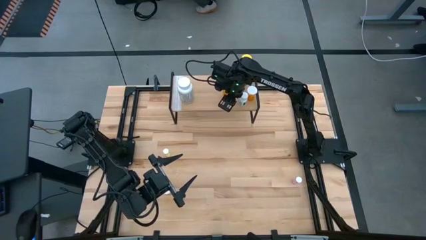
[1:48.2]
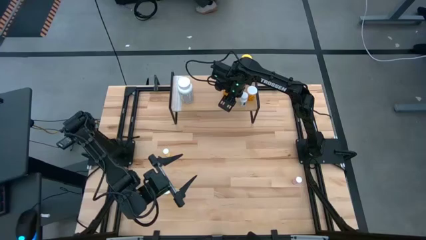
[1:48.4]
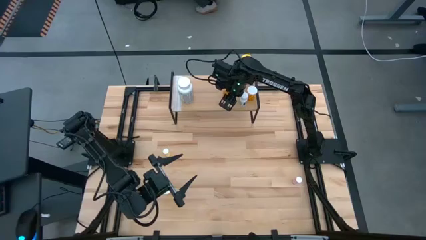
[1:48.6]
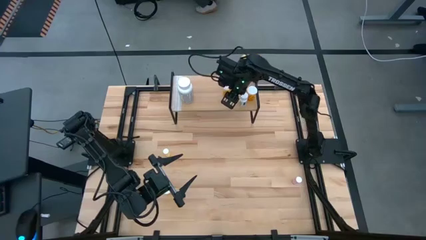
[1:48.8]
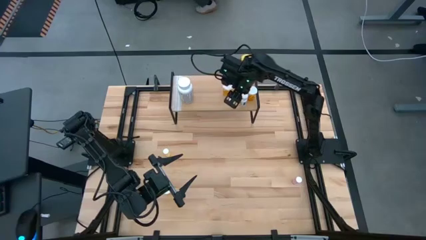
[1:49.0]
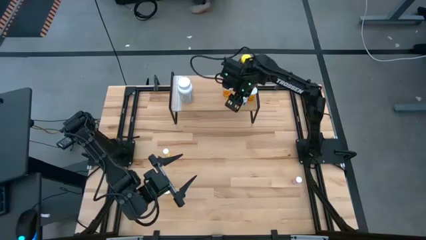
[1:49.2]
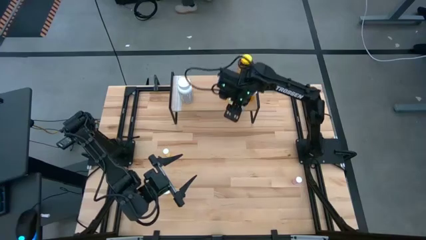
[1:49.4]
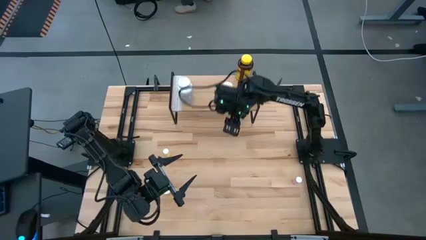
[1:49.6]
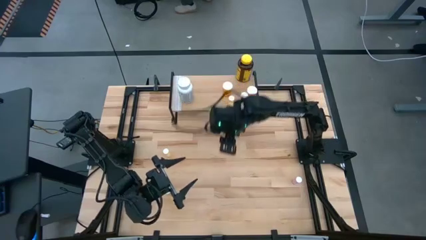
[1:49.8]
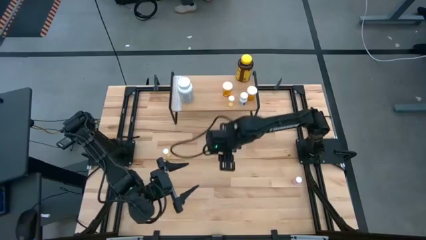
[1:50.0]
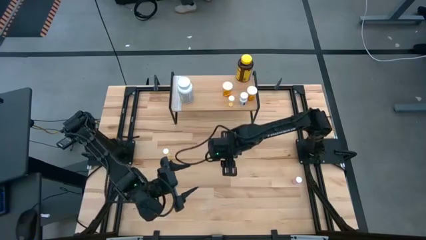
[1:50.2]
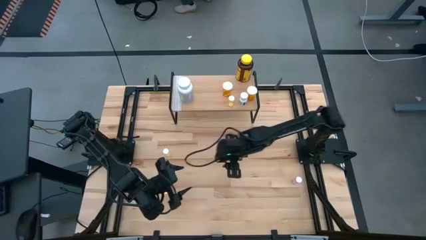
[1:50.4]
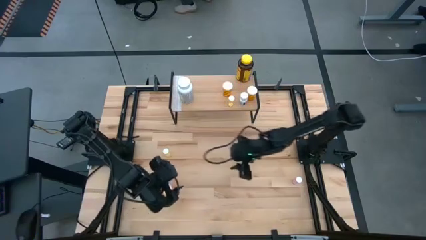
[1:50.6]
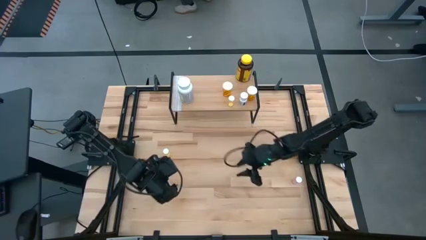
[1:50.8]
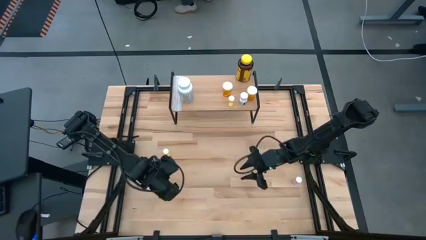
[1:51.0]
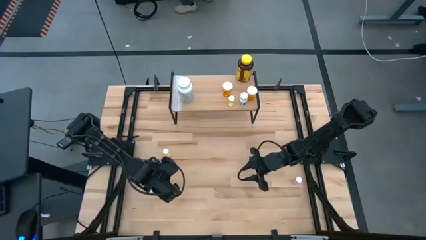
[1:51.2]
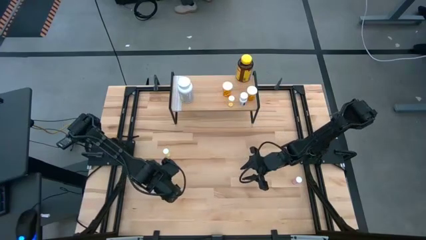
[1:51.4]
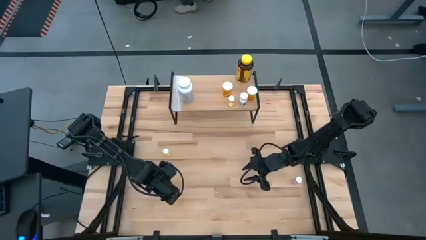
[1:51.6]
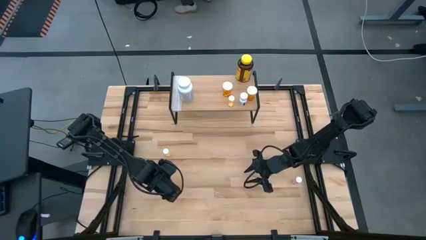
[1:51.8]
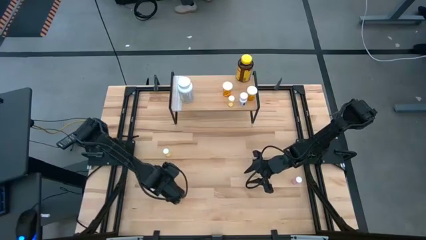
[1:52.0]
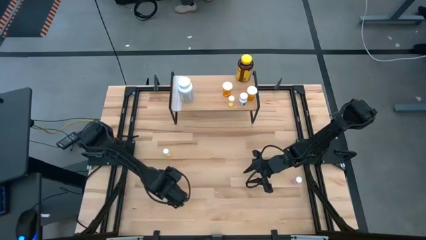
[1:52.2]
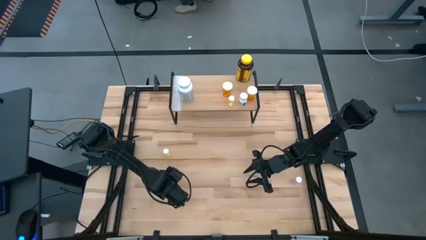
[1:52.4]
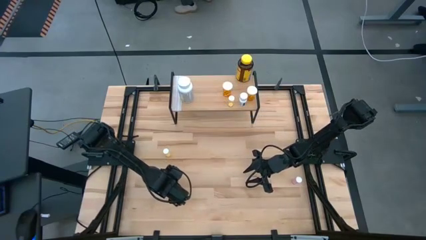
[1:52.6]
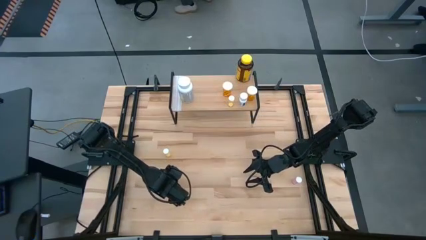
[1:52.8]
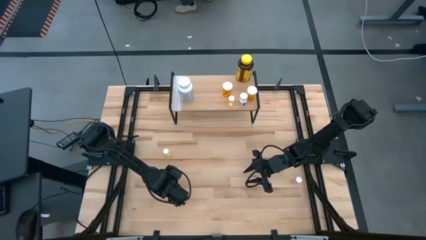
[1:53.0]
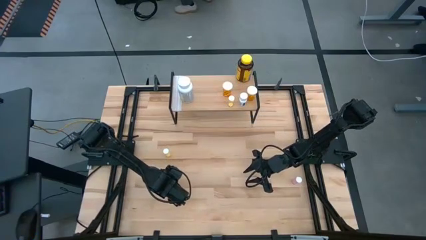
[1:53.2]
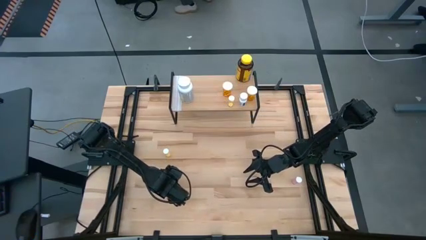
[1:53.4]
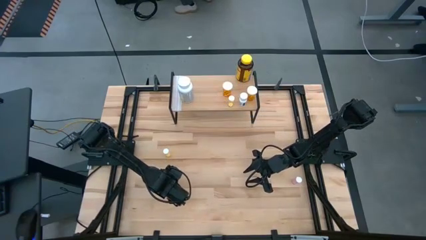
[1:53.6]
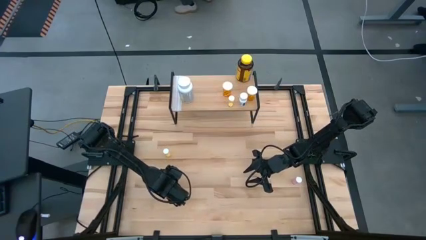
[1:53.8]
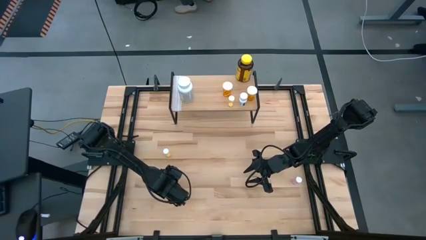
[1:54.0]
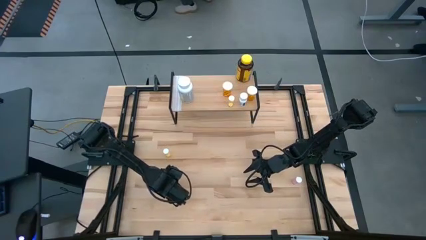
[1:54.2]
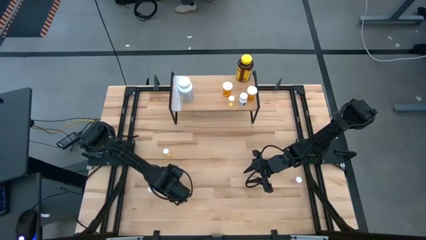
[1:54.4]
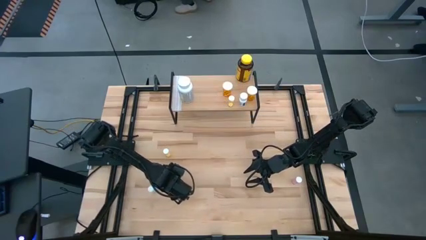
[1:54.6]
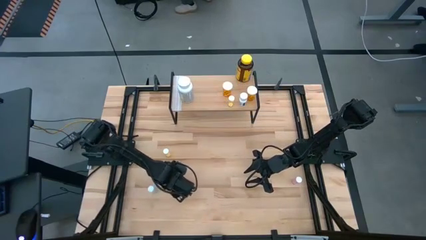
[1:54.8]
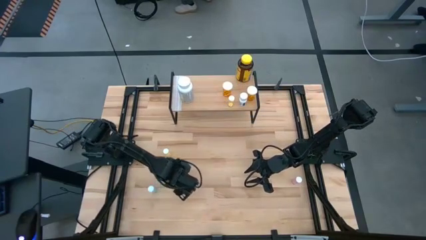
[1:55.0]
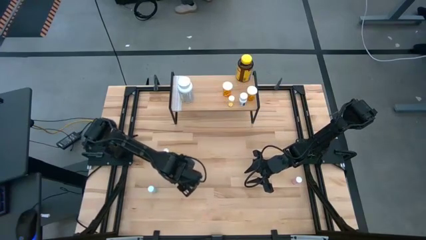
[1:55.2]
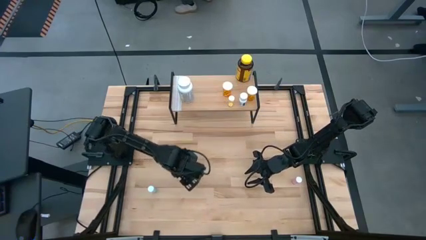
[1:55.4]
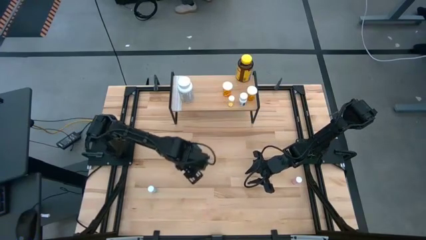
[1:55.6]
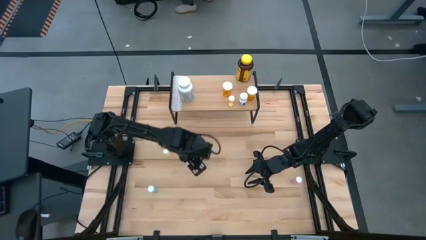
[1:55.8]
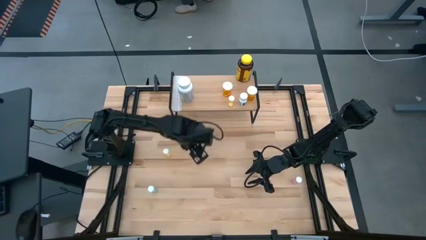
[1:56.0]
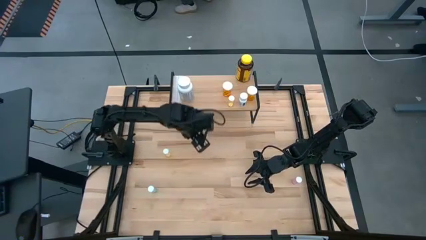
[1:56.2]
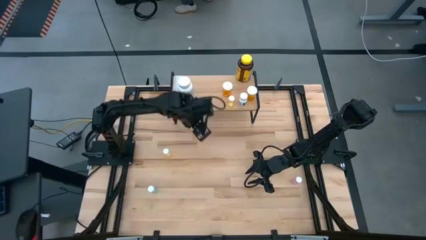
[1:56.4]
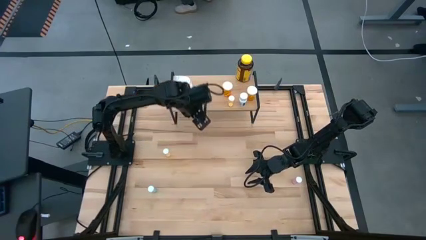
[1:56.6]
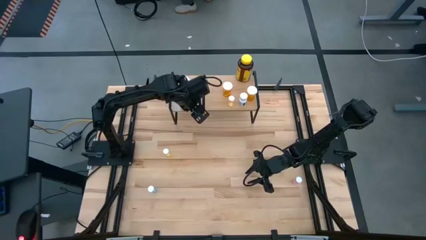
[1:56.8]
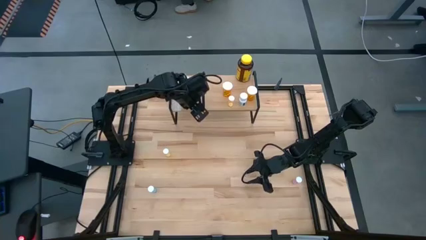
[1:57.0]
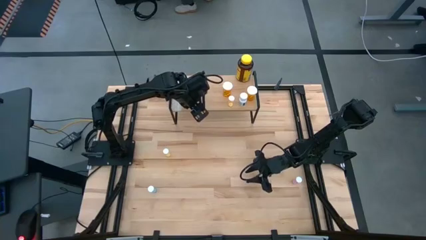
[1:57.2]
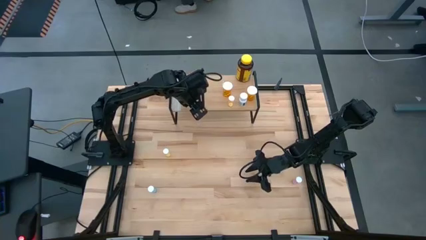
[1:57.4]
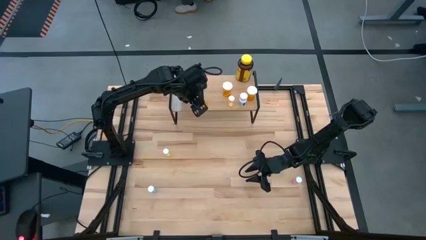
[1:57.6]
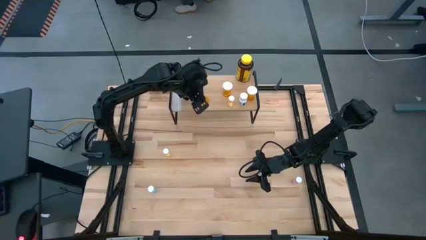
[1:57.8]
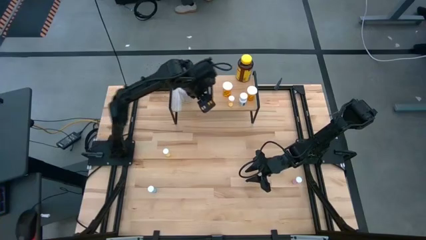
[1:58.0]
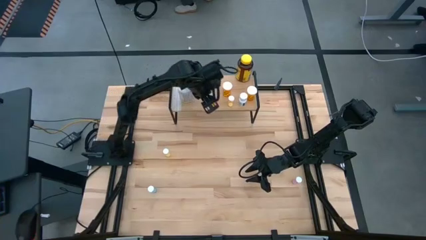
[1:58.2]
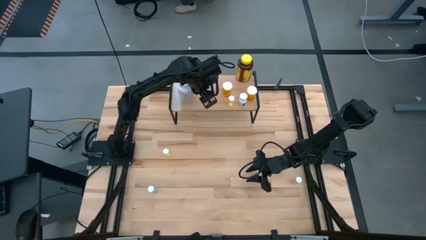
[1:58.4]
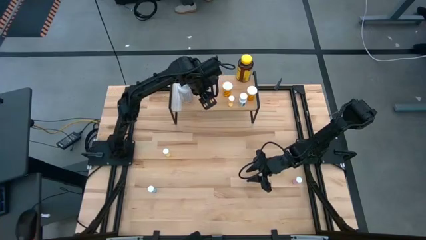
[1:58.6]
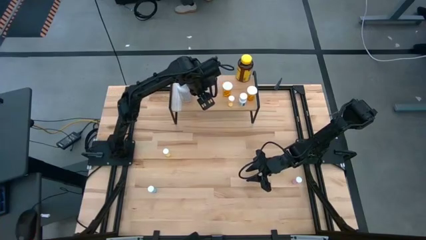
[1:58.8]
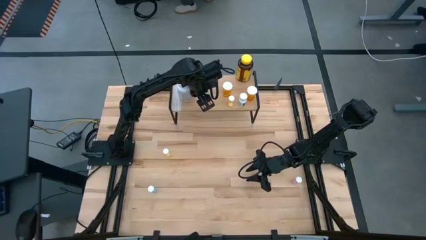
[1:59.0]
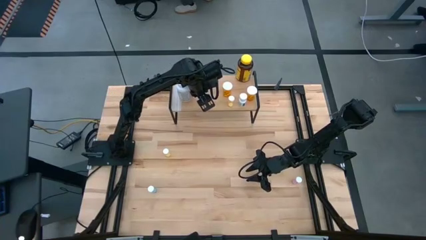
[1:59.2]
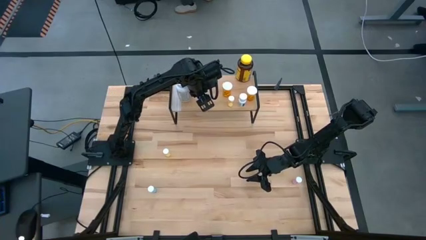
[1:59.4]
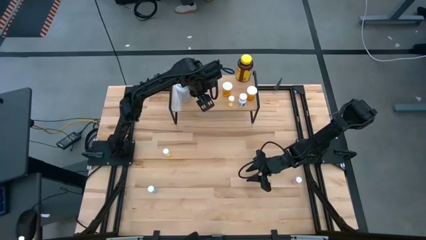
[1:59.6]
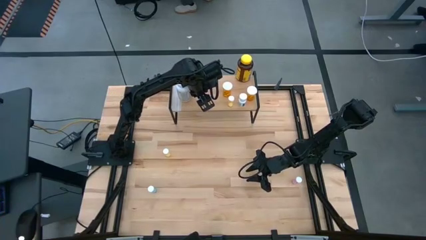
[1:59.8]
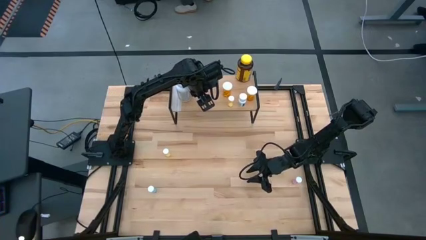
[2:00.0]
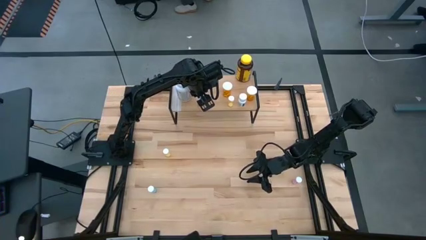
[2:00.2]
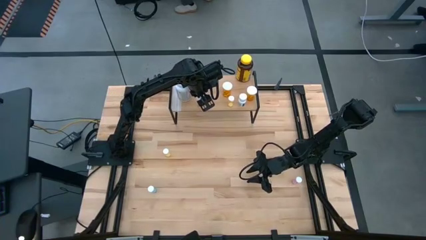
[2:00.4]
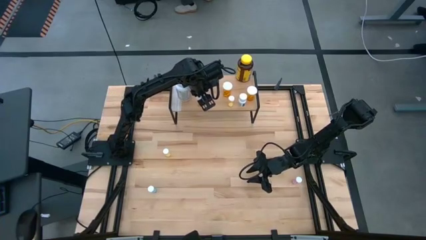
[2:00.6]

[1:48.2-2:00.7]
Task: Pick and place medicine bottles onto shelf by color
Put the small orange medicine bottle on the shelf

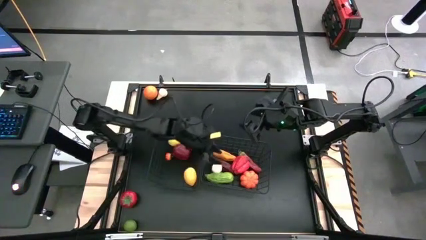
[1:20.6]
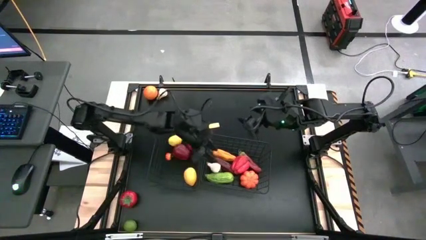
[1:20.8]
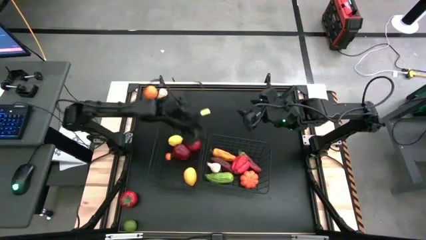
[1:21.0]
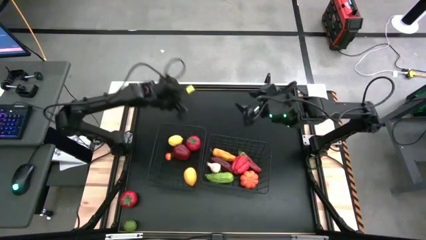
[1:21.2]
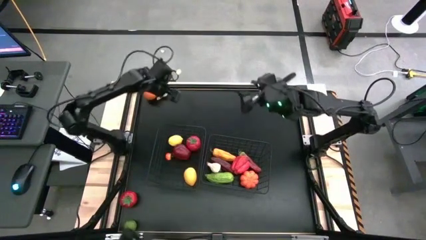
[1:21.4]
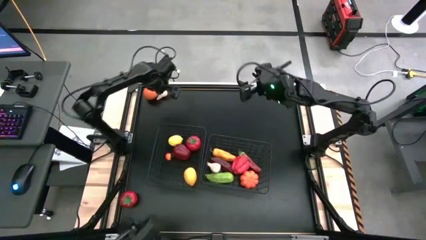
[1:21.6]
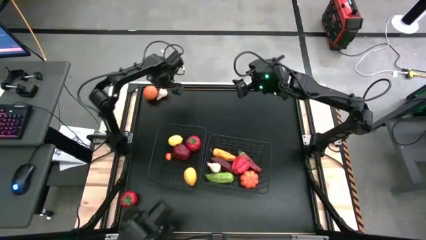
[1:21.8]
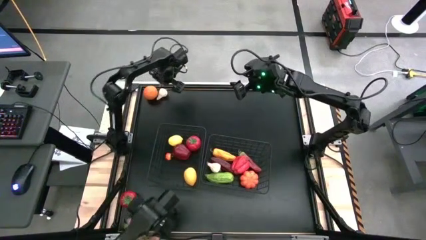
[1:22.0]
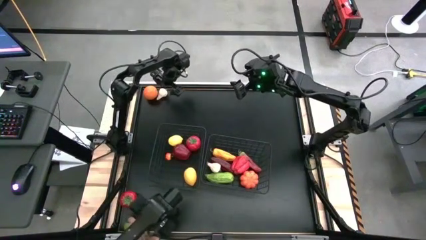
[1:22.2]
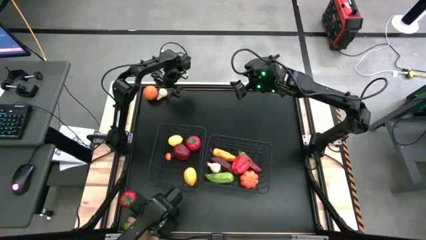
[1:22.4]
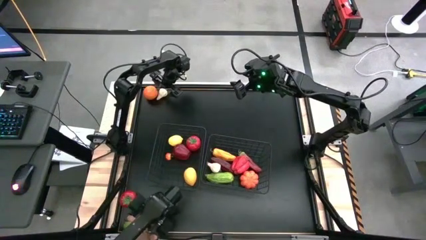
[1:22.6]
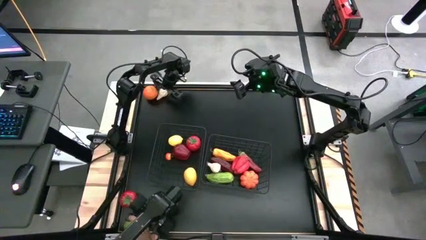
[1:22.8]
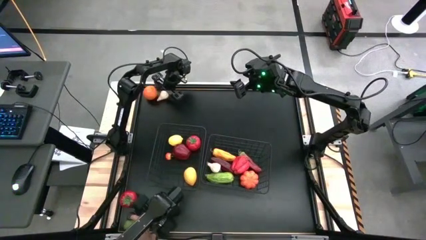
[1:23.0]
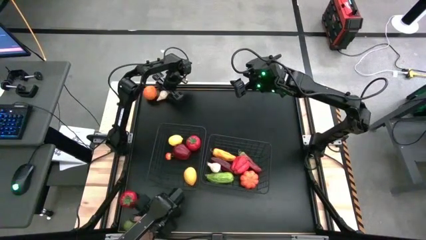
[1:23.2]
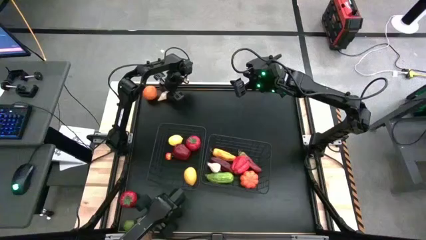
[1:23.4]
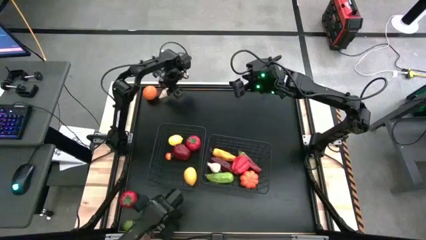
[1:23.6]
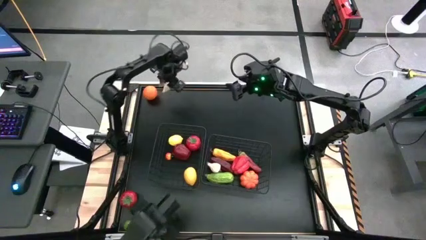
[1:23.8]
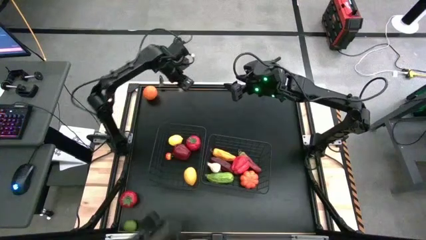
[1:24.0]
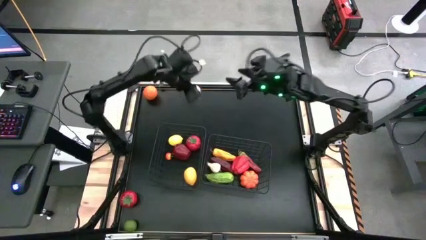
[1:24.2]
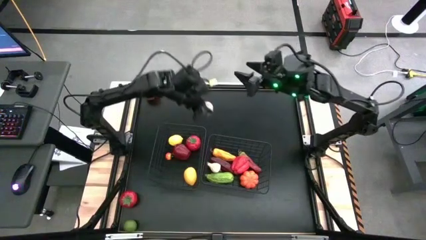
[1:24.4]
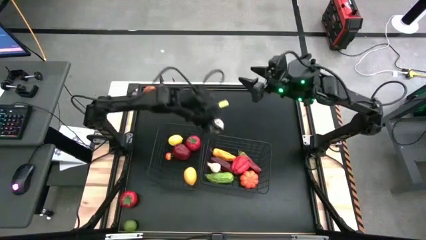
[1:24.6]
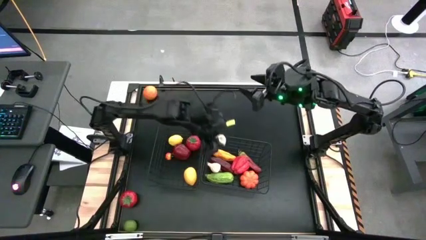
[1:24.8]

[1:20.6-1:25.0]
Task: Sort produce into baskets
Put the white garlic into the right wire basket
